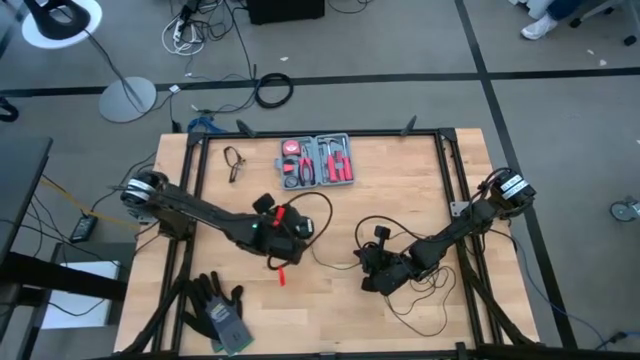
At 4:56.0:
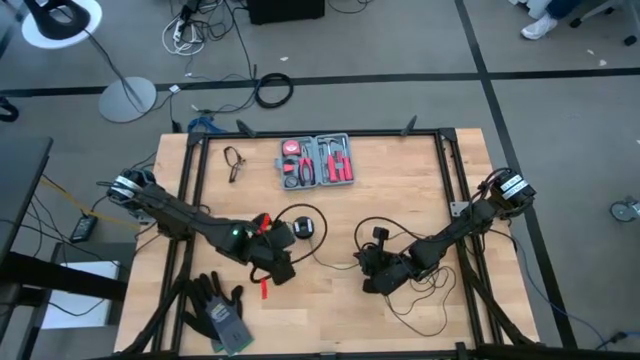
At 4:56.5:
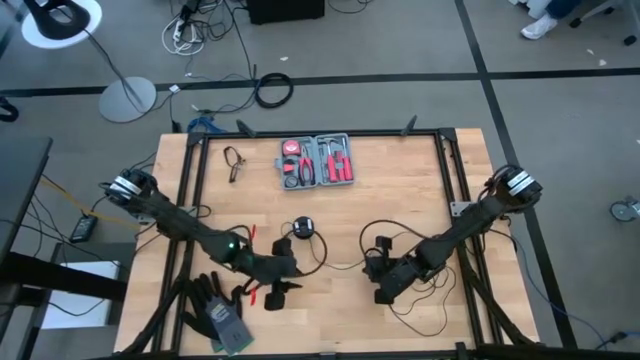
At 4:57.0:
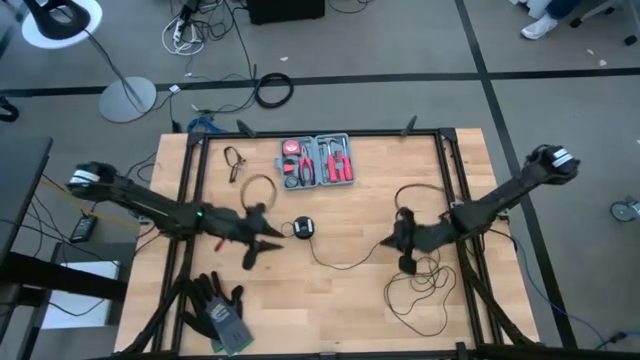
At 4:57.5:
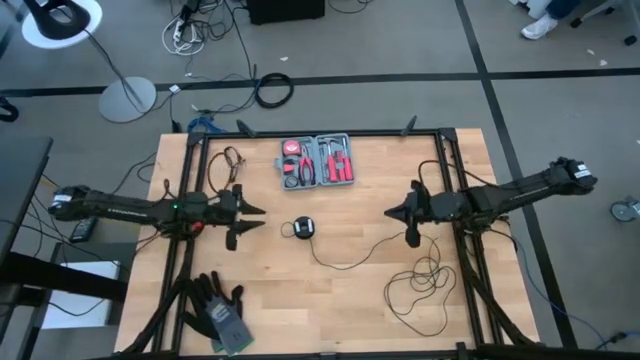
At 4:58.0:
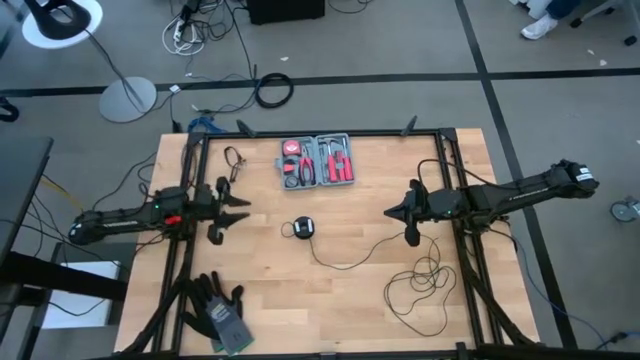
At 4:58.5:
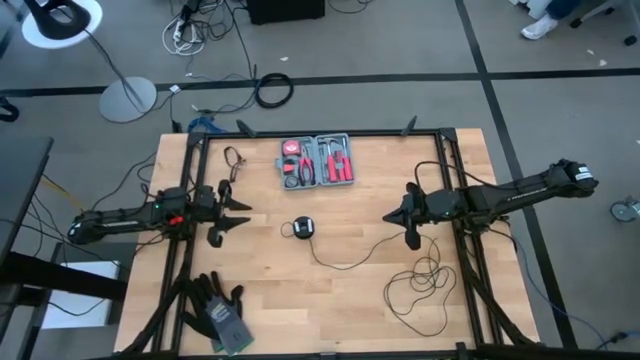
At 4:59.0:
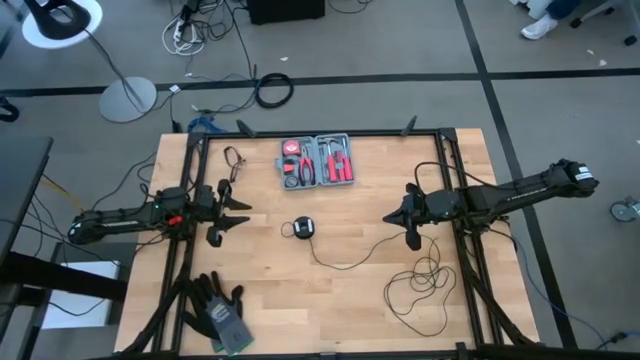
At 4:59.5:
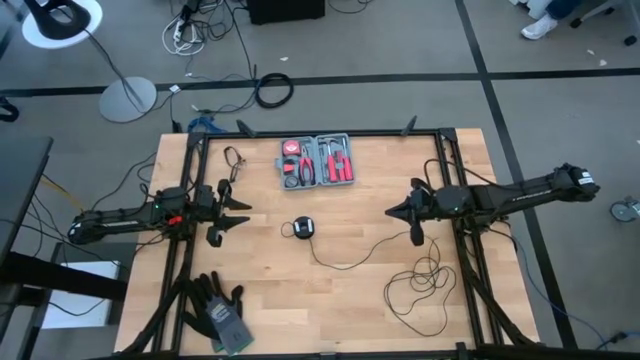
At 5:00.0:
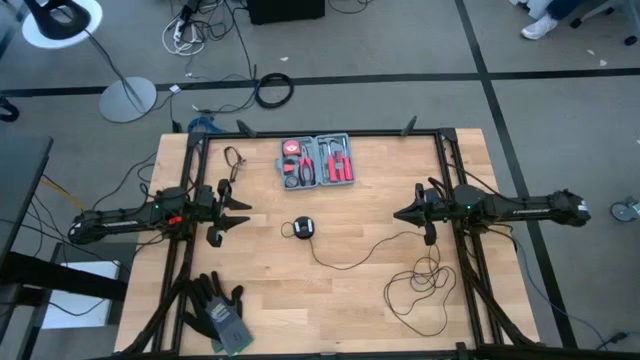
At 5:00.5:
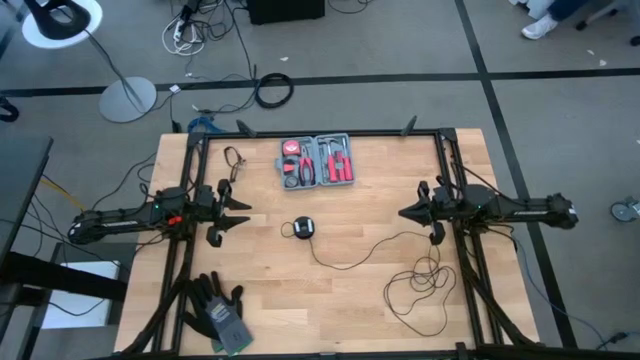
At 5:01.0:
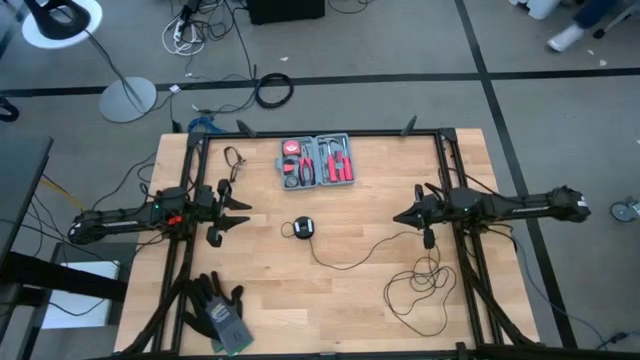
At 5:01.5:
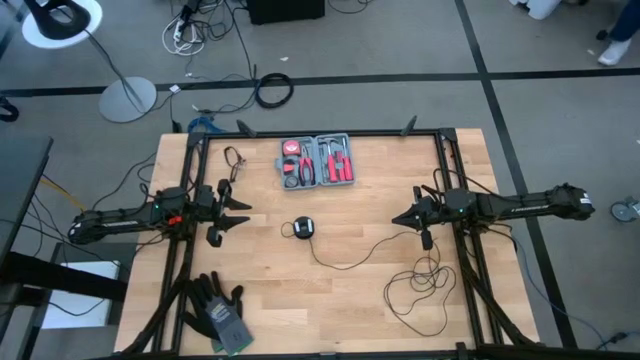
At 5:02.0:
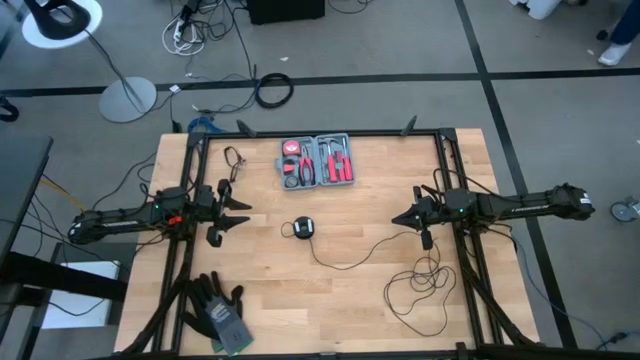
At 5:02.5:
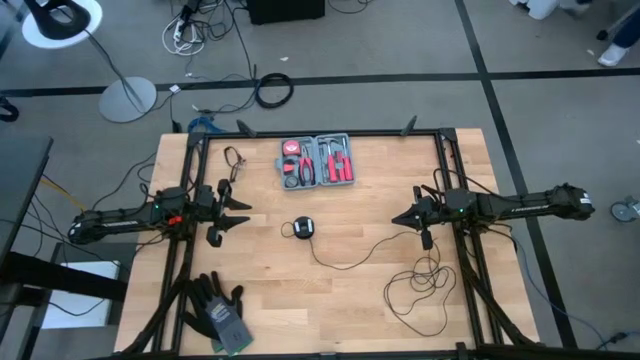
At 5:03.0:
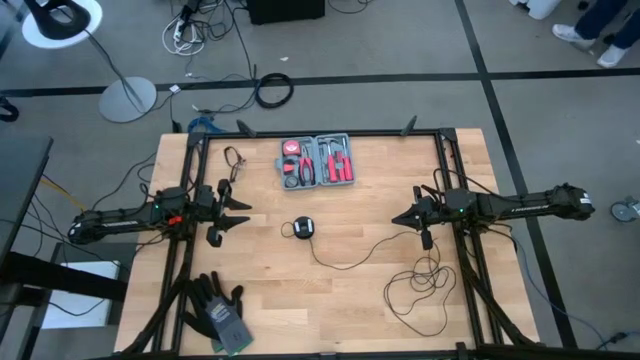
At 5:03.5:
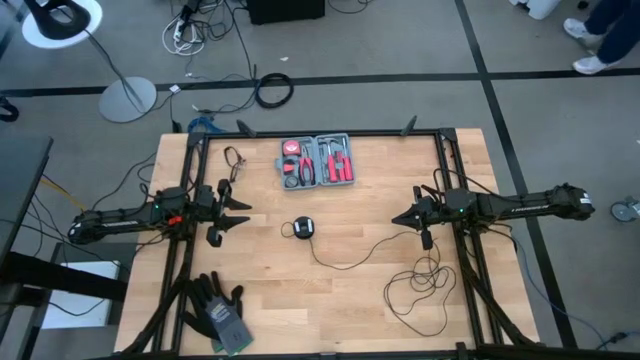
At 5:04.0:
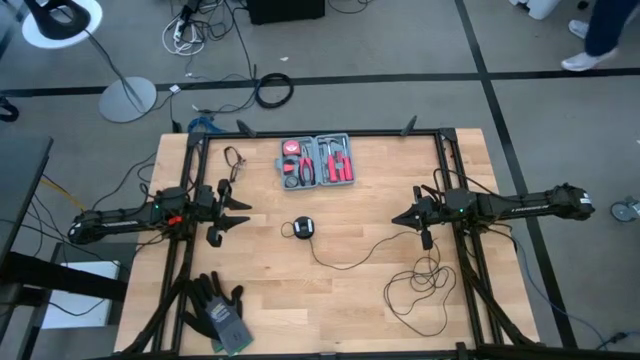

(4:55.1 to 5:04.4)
Task: Coil cords
Return to Home Position

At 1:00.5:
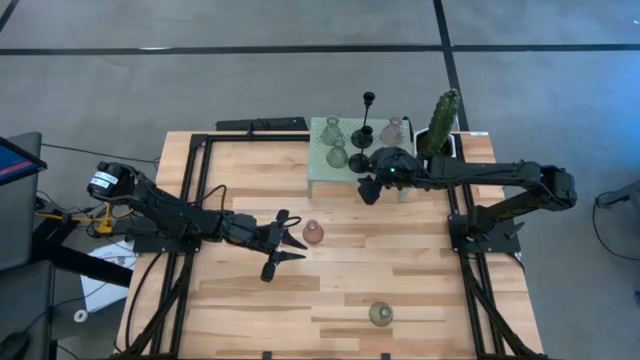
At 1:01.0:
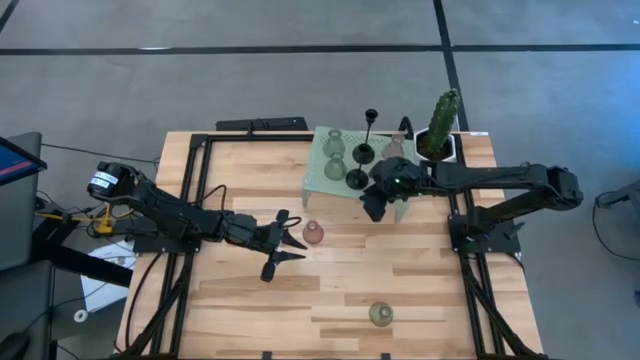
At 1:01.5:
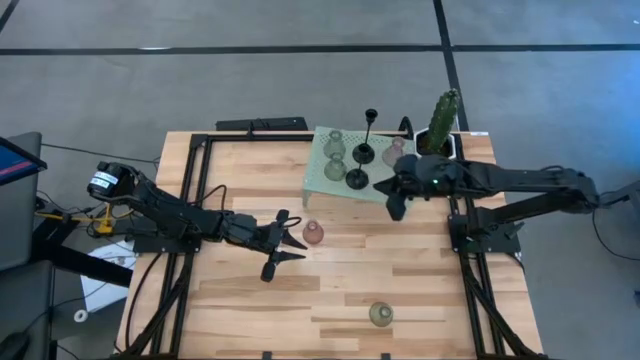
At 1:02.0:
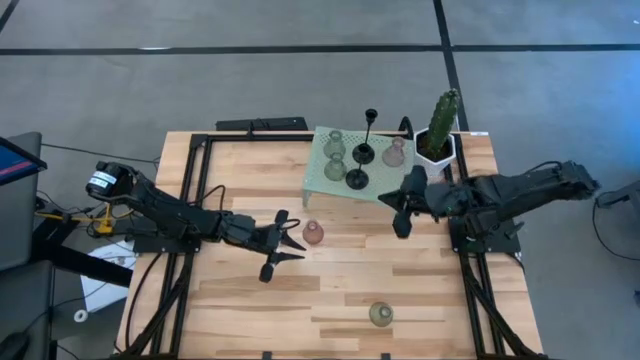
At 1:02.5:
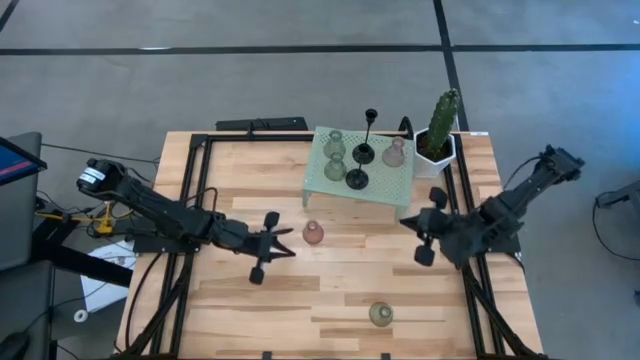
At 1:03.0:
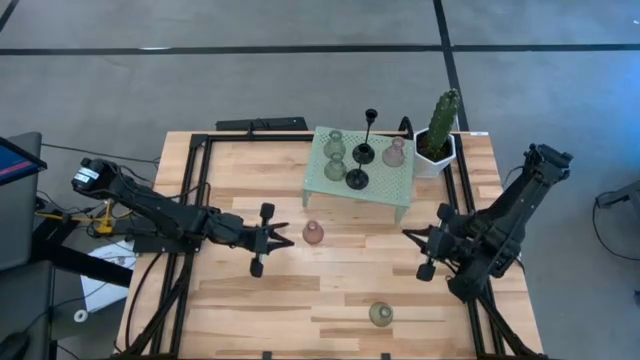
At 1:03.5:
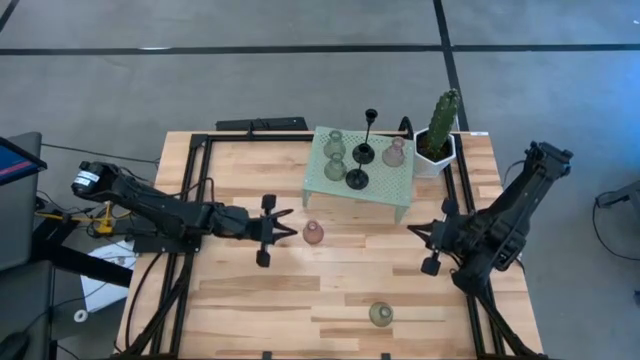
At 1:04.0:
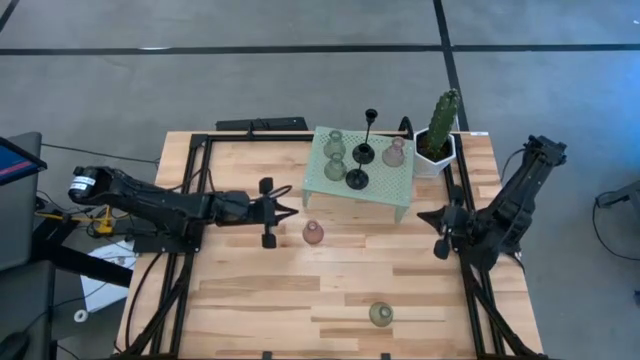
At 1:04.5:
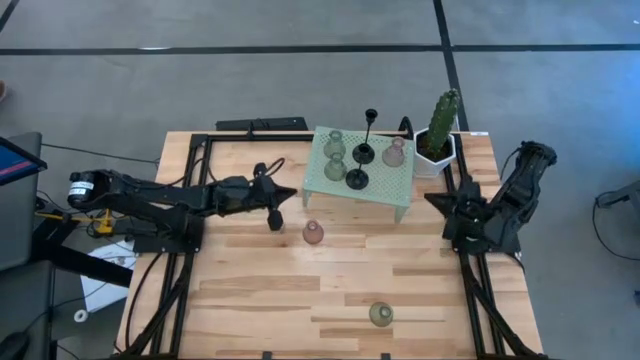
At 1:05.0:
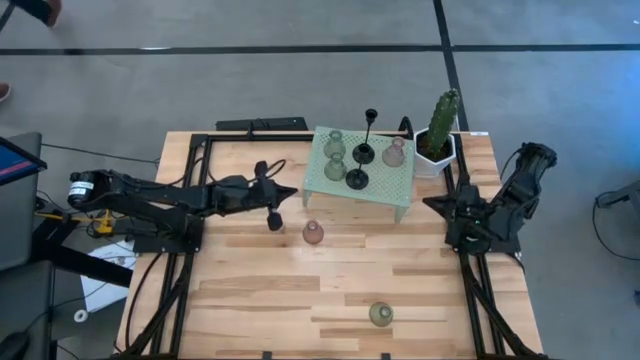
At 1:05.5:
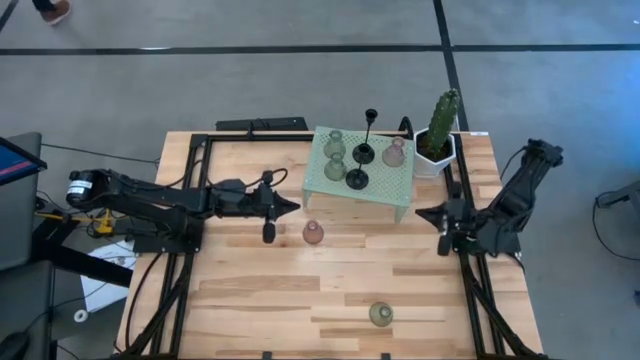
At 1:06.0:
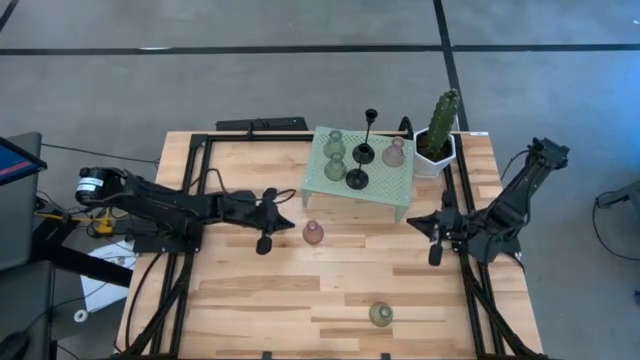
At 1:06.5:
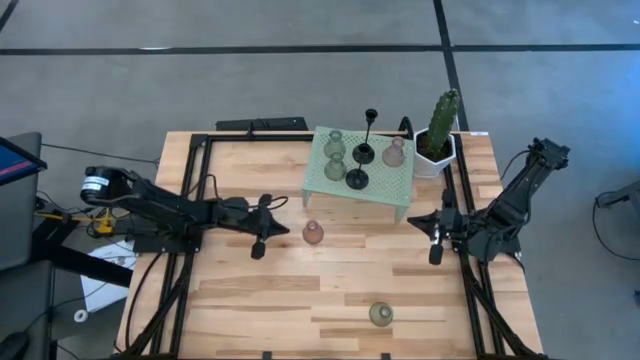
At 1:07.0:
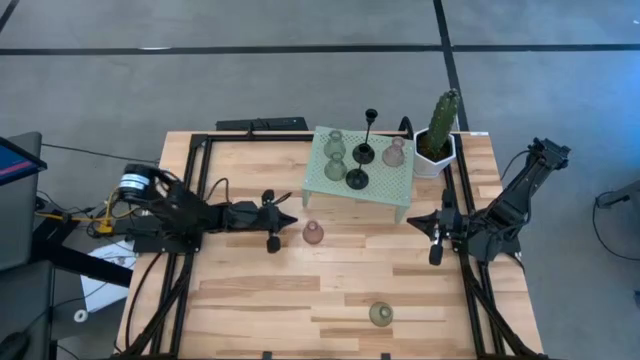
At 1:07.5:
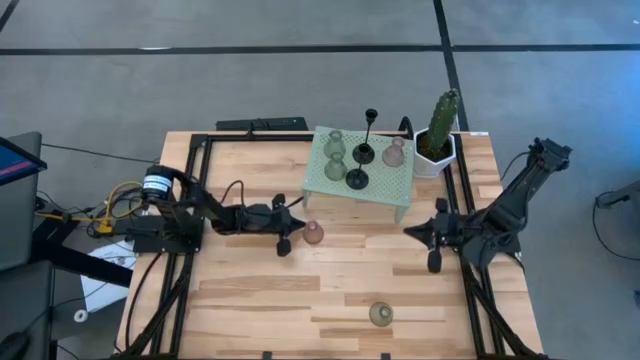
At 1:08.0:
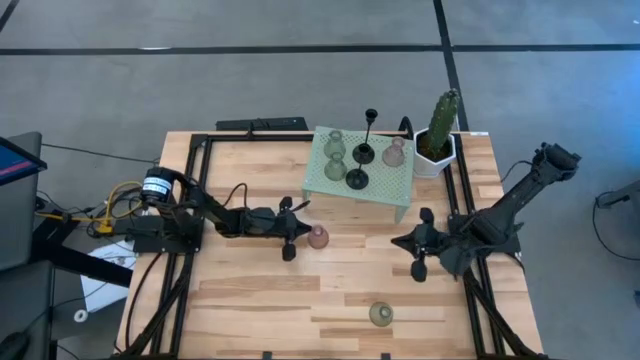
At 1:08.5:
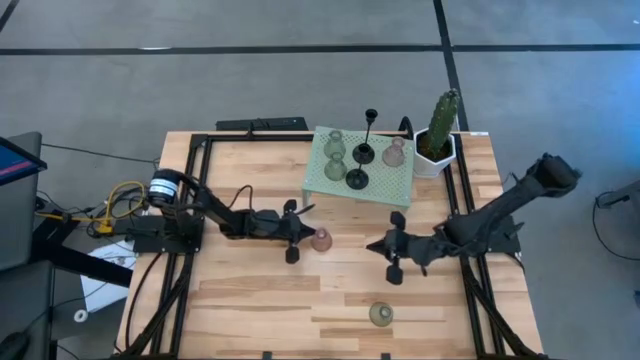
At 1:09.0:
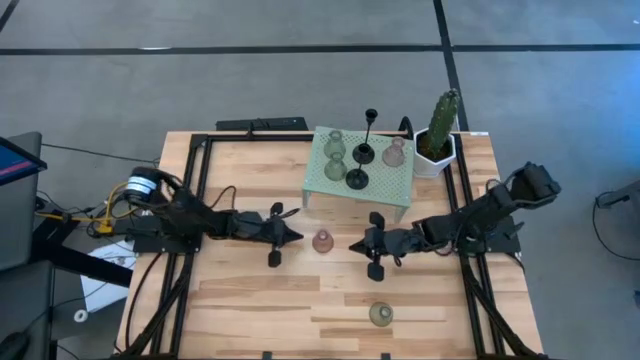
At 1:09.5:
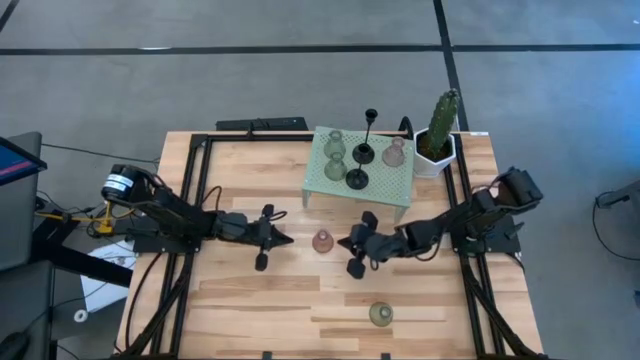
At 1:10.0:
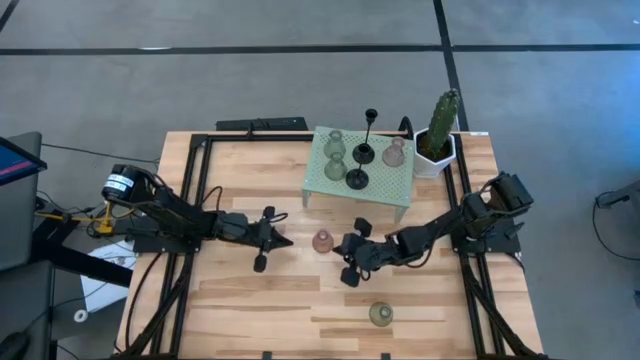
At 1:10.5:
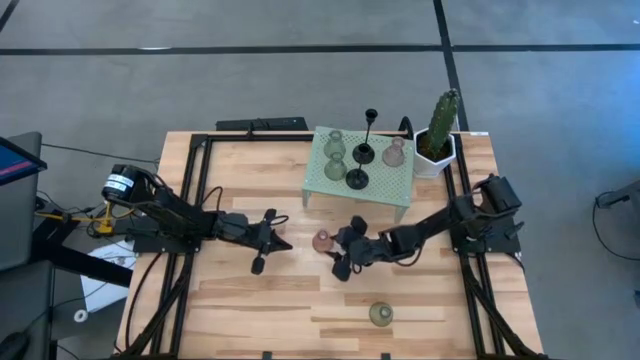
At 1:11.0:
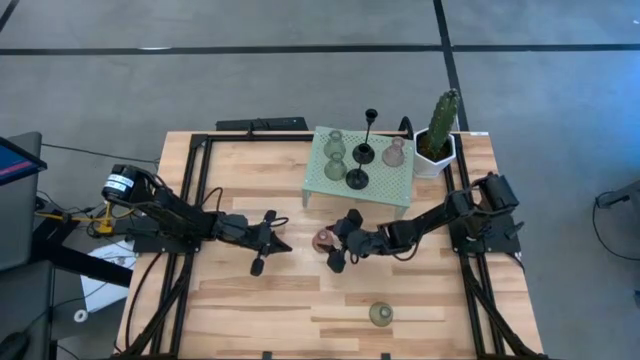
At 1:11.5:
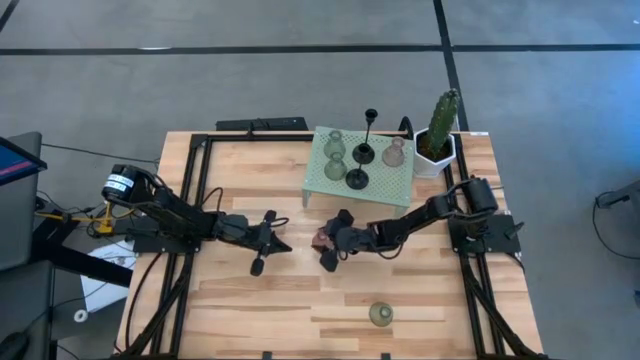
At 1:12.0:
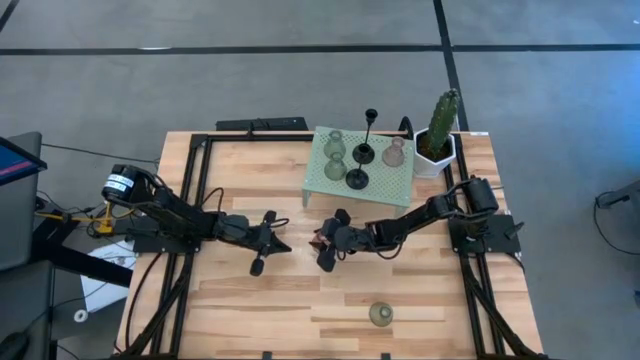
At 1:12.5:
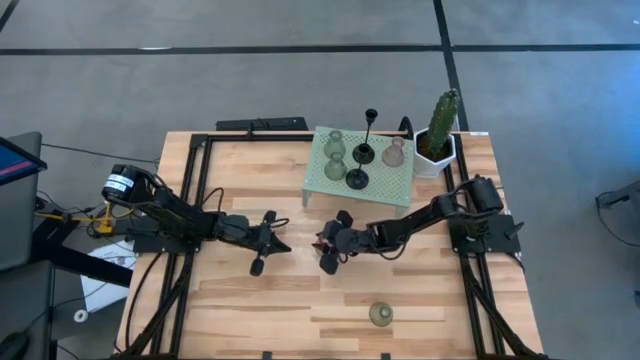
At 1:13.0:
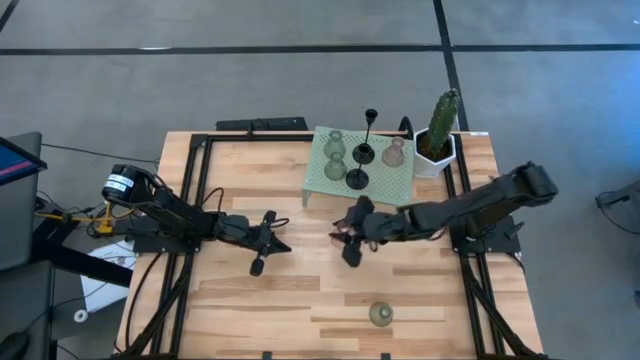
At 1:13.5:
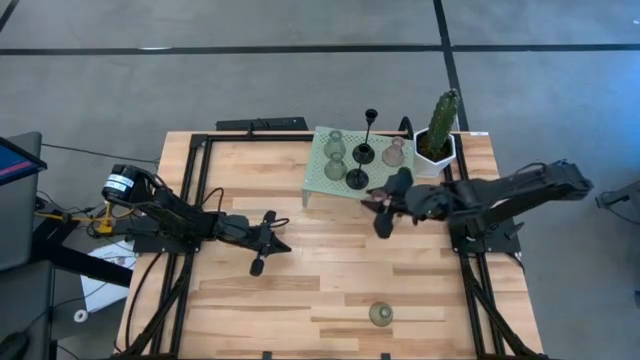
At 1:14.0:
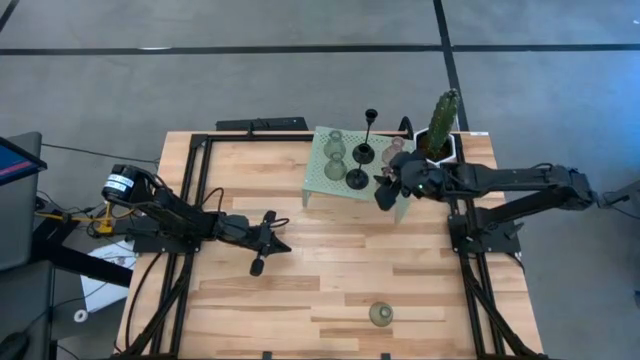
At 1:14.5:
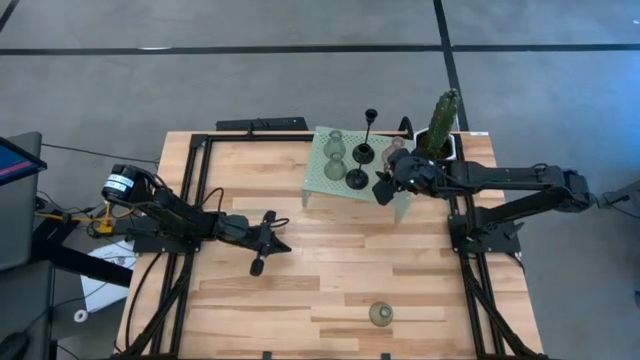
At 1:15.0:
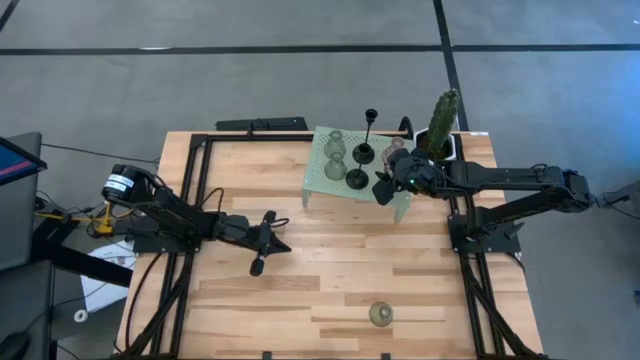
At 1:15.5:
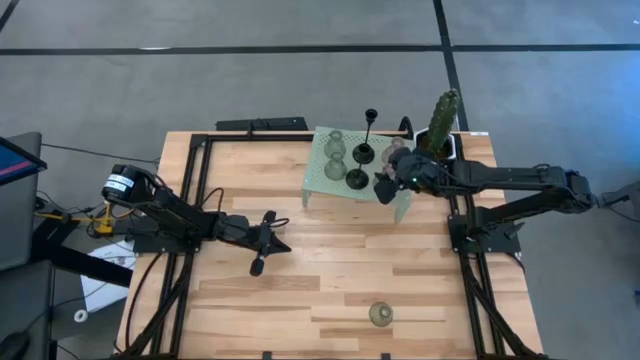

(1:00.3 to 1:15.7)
Task: Pick & Place candle stick holders
Put the pink glass candle holder on the shelf aligned with the other pink glass candle holder
